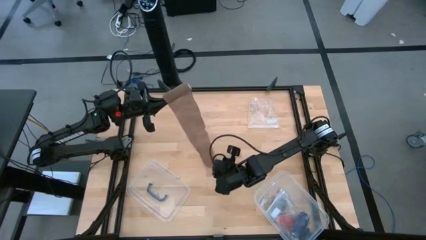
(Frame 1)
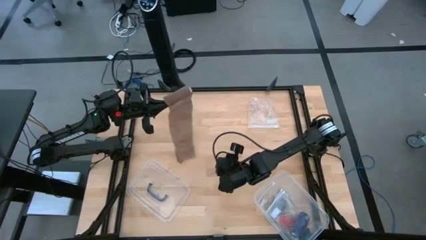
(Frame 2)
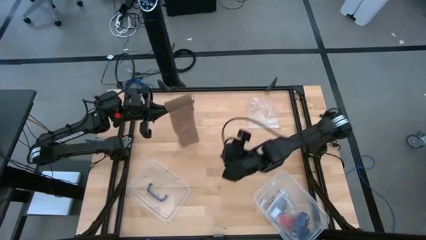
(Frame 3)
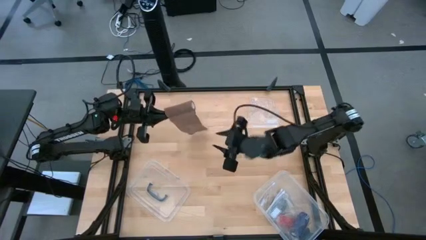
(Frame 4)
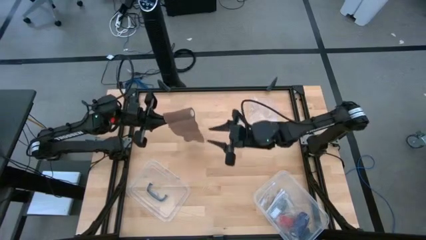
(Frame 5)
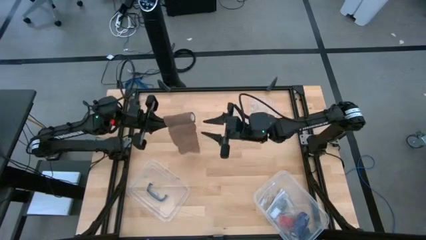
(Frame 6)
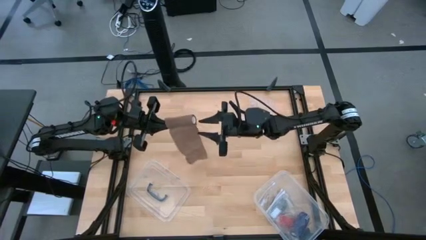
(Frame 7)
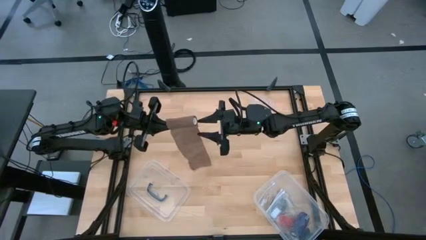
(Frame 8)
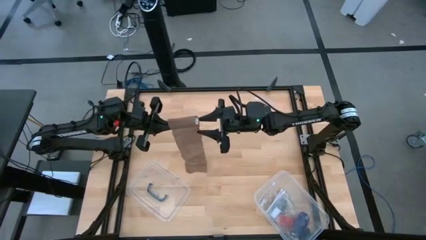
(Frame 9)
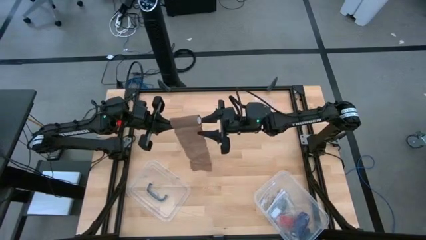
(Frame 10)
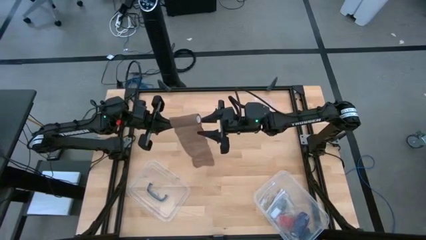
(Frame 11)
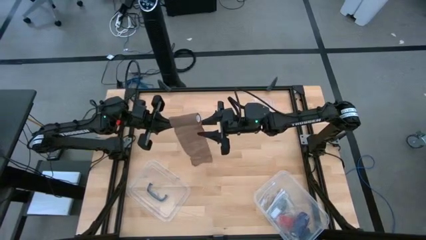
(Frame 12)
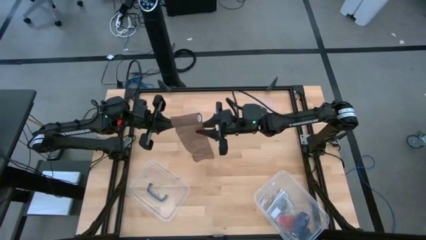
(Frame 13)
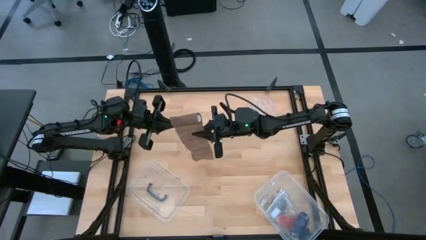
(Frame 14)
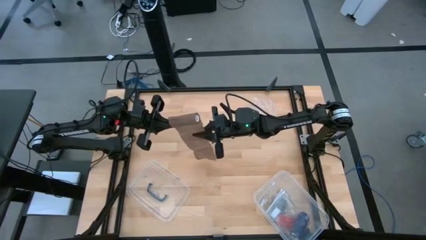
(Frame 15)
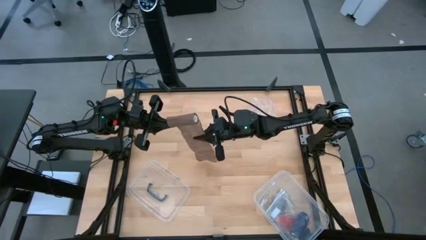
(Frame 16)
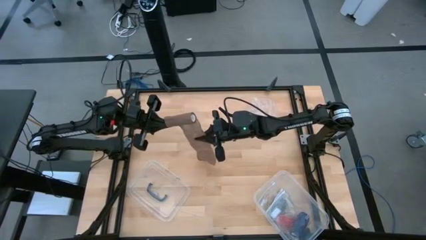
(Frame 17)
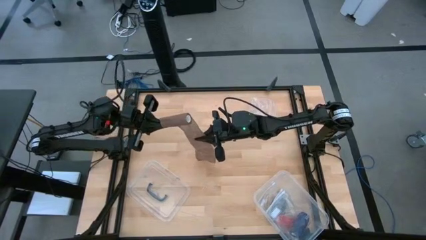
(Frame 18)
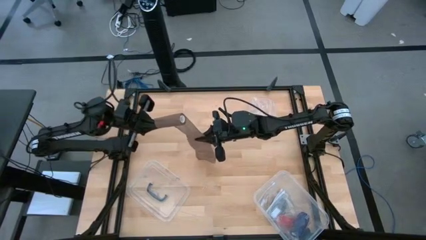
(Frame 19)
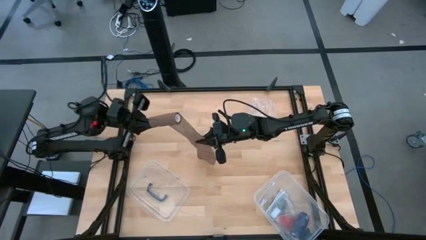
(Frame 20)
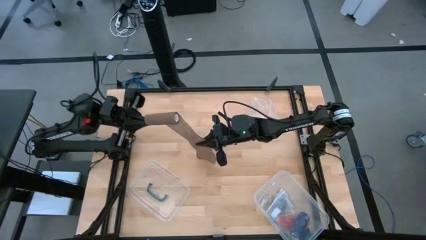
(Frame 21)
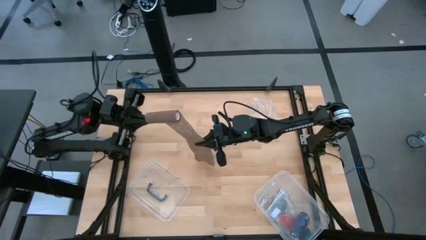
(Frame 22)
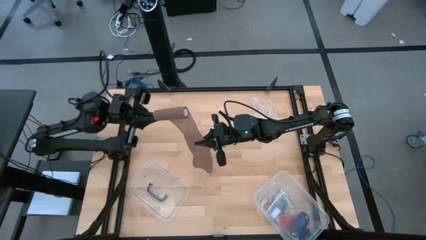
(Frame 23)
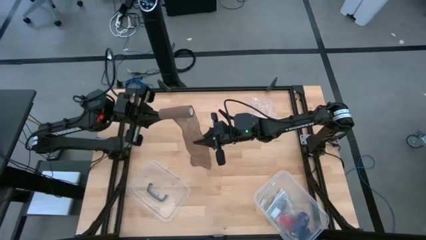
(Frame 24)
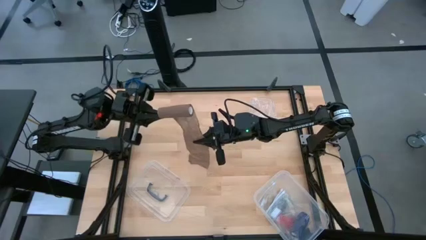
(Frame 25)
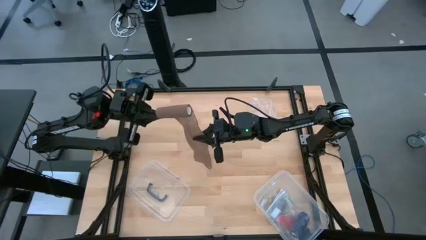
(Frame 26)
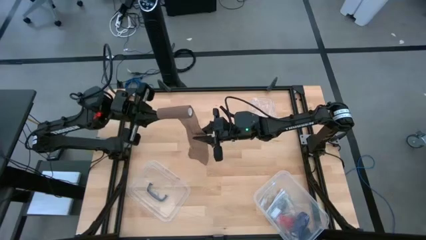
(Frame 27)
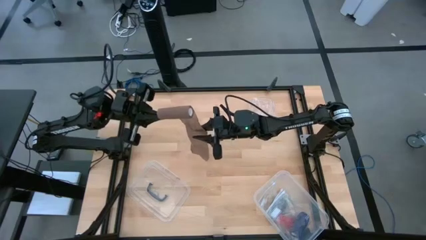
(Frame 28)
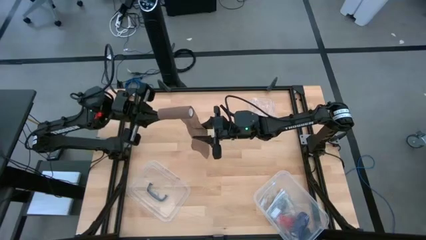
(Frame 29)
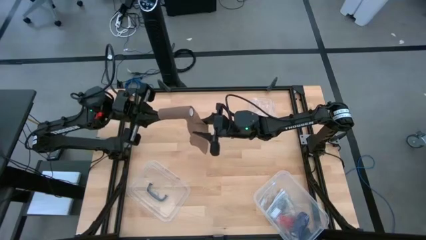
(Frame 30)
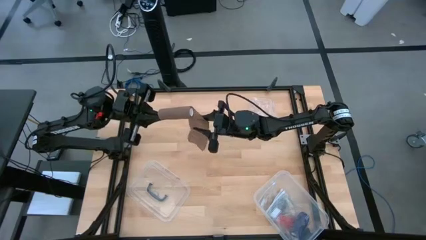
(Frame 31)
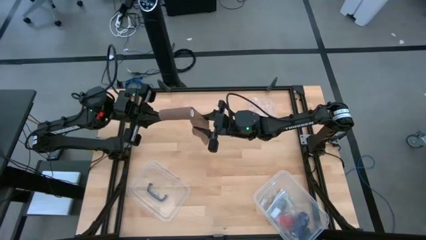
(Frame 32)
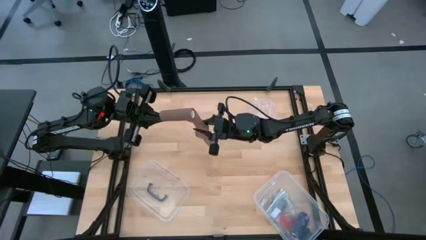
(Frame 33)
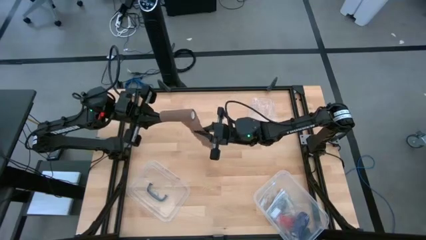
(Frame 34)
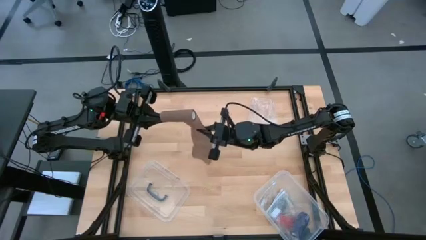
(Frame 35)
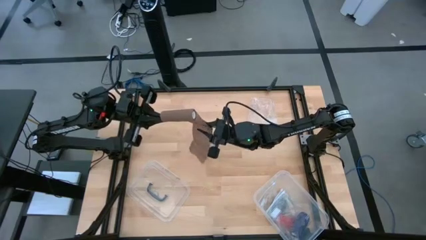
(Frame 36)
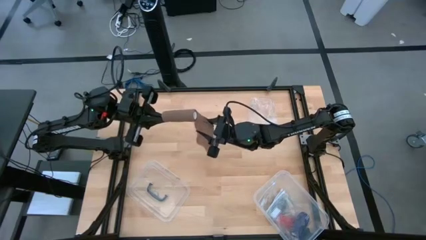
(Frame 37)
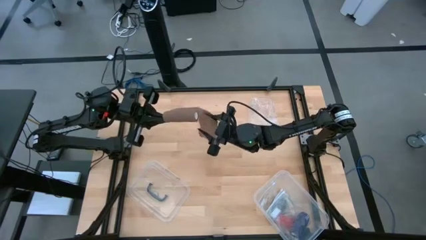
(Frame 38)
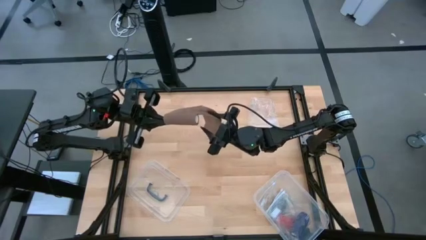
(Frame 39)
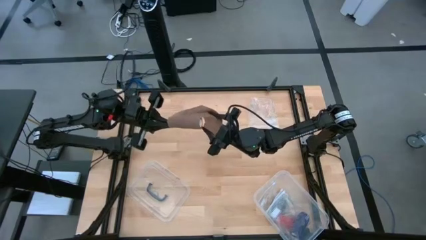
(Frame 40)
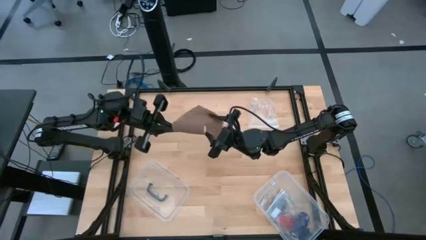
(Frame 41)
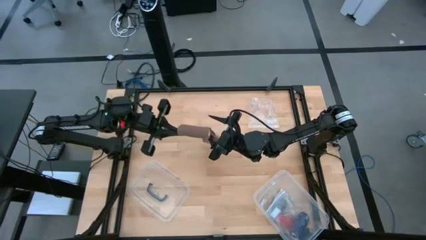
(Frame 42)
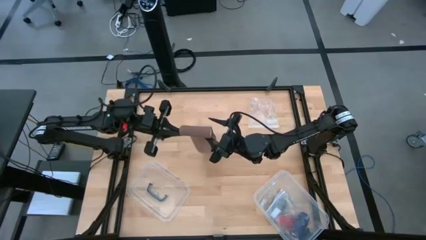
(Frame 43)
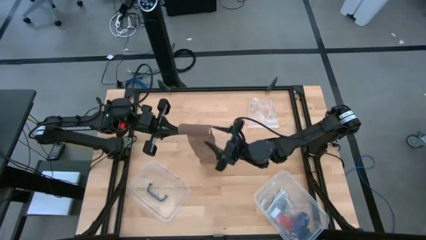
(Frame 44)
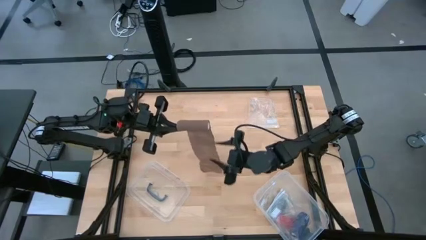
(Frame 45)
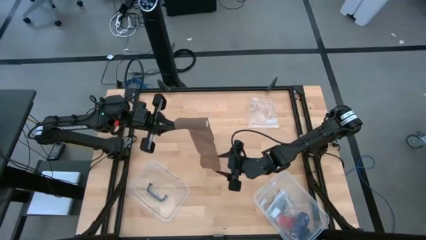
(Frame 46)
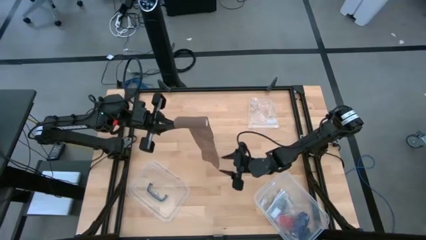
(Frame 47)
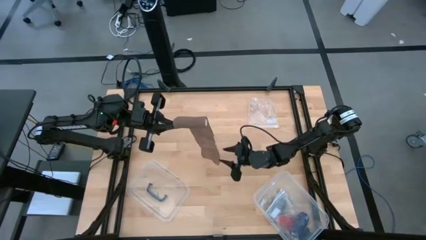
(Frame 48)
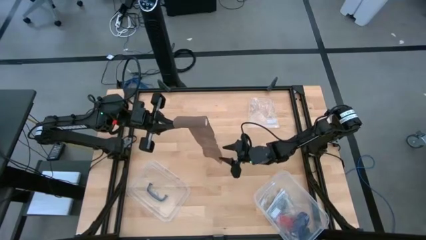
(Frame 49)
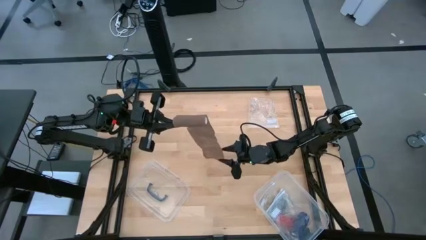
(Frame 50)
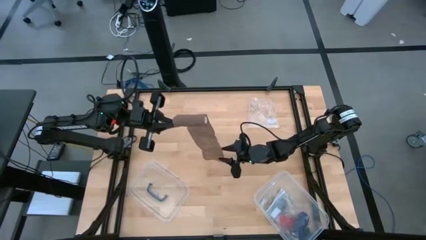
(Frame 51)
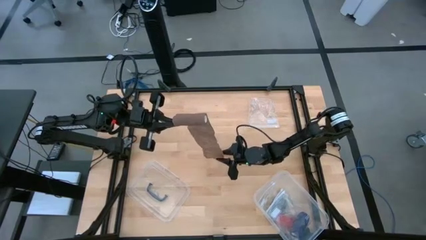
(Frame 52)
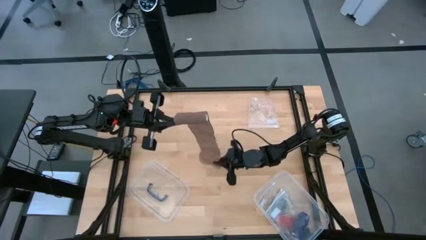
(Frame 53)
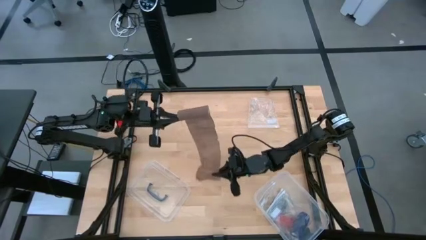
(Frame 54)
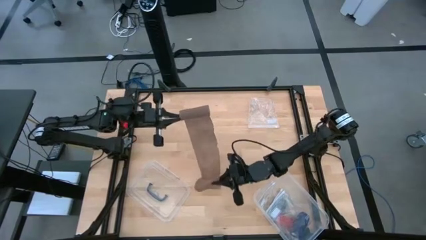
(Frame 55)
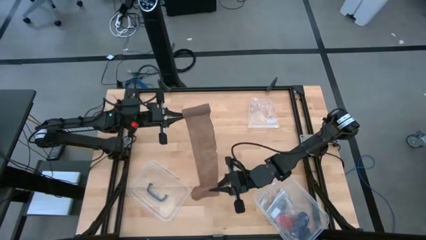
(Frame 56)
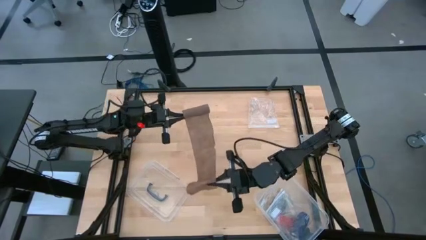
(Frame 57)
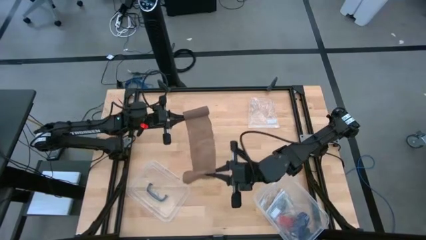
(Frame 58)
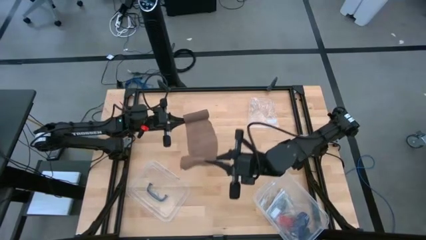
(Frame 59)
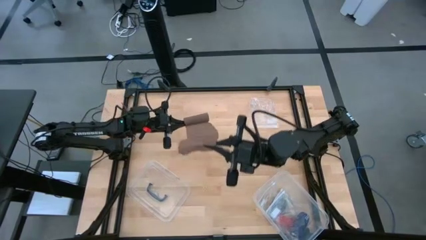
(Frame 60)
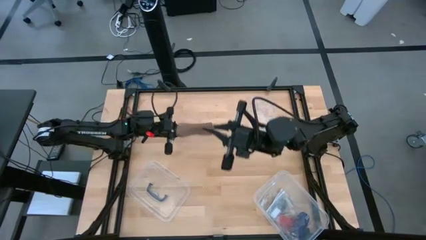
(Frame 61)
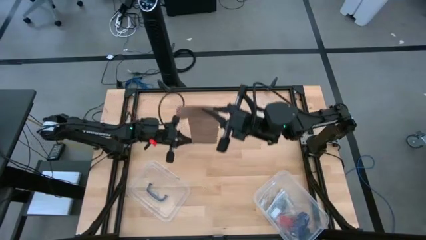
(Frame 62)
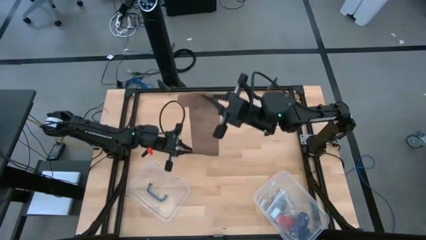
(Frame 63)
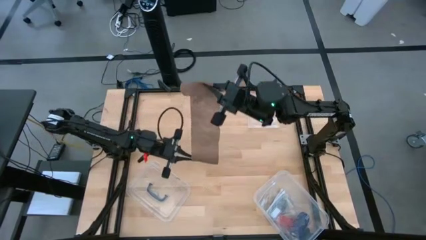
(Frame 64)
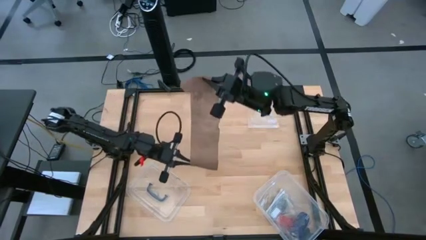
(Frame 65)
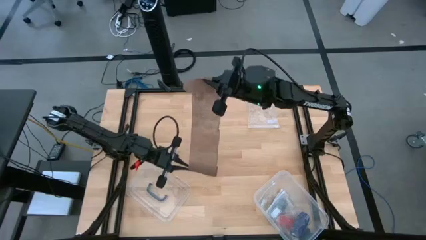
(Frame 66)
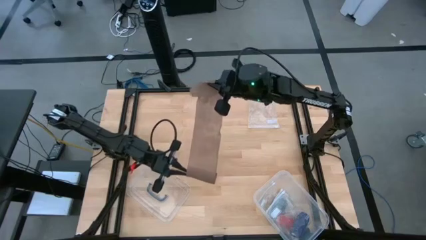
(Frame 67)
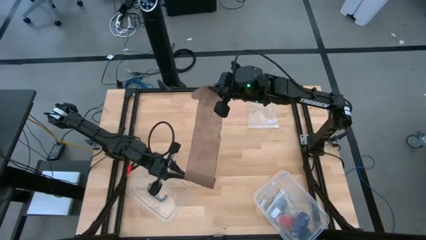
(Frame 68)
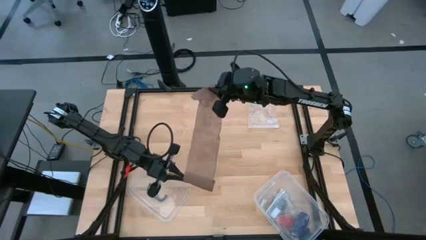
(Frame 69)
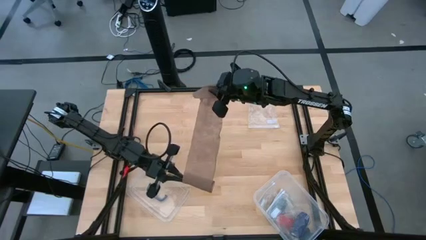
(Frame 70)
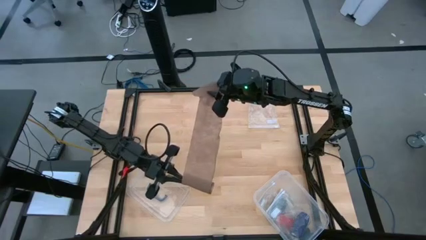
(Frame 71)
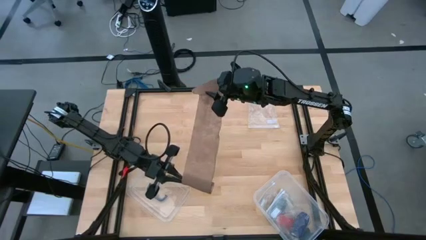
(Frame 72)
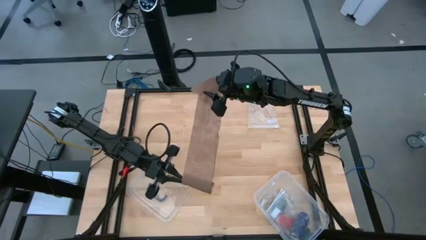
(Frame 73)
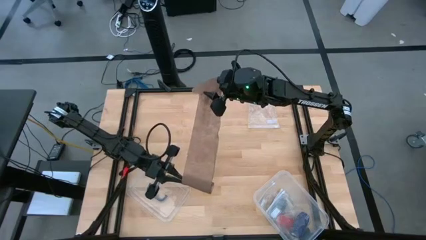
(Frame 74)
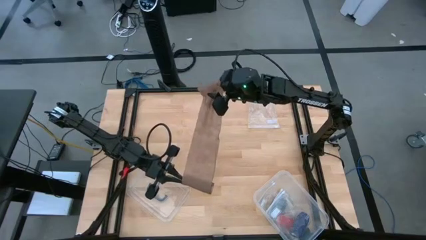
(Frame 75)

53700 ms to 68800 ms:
Task: Roll bandage
Roll the brown bandage

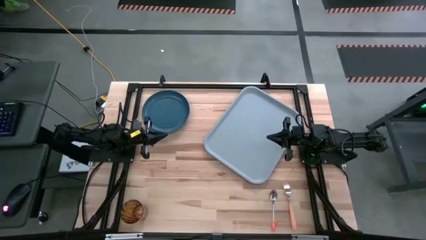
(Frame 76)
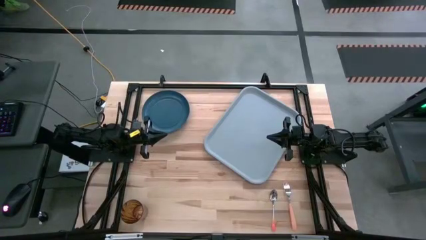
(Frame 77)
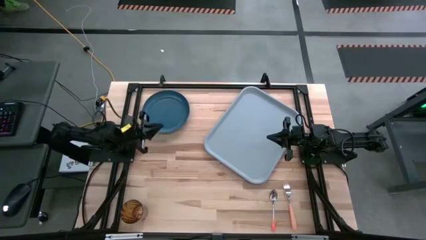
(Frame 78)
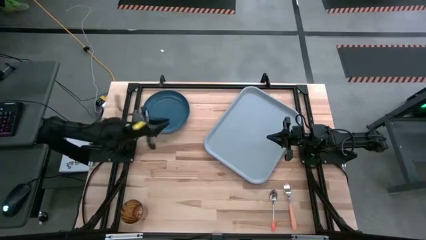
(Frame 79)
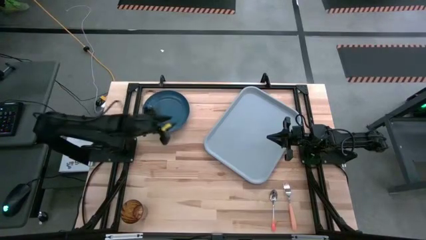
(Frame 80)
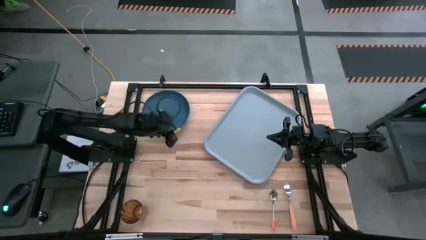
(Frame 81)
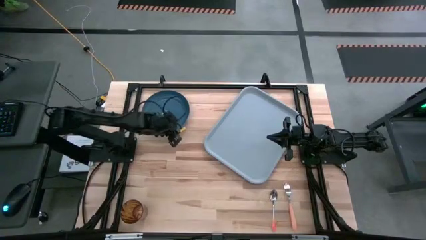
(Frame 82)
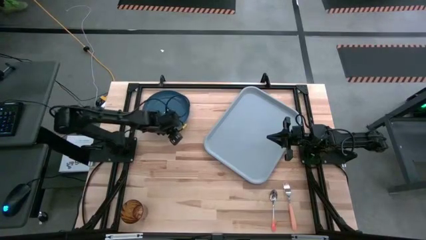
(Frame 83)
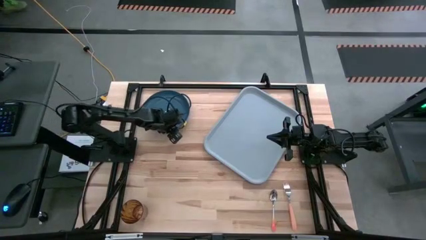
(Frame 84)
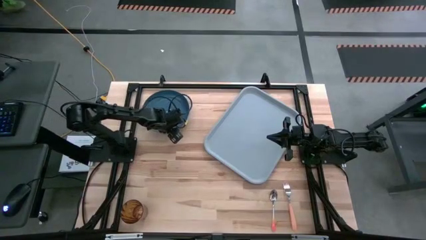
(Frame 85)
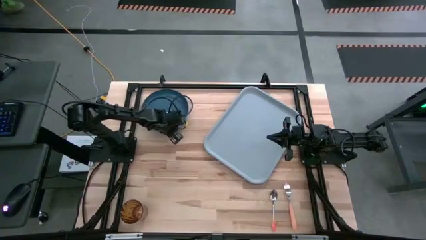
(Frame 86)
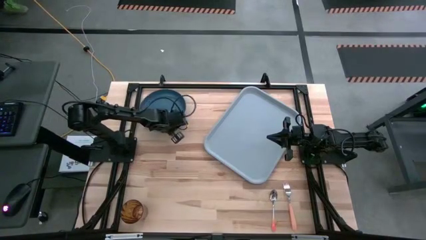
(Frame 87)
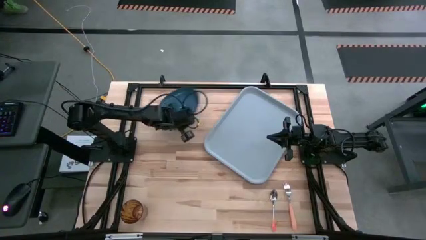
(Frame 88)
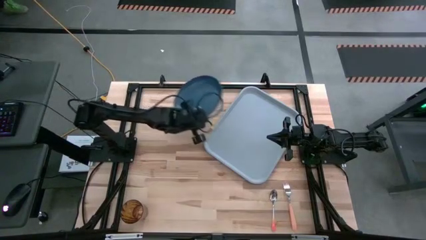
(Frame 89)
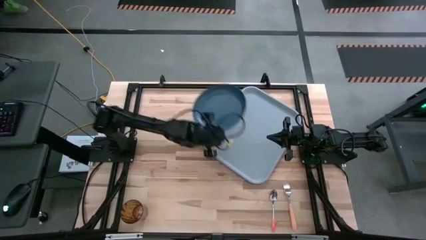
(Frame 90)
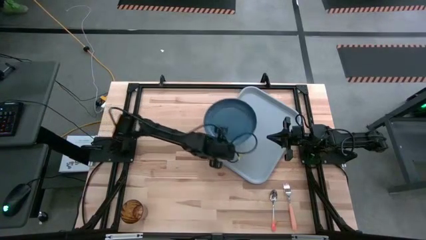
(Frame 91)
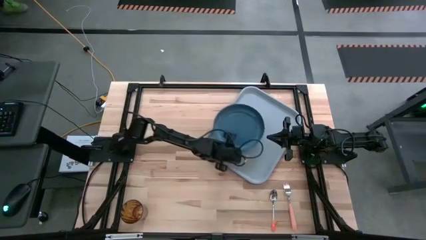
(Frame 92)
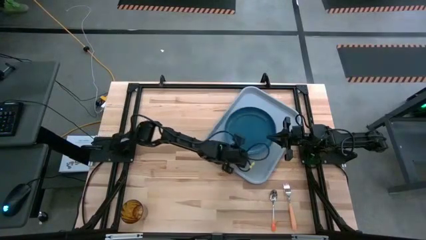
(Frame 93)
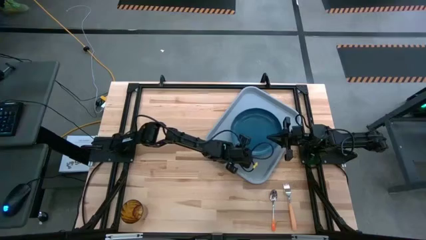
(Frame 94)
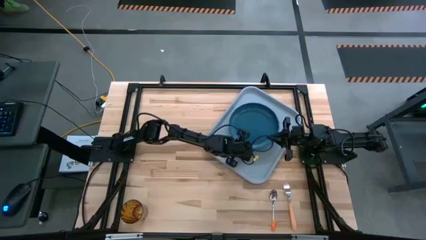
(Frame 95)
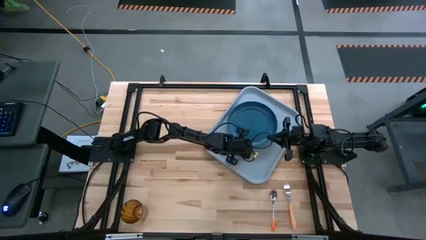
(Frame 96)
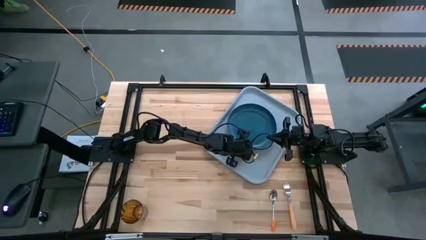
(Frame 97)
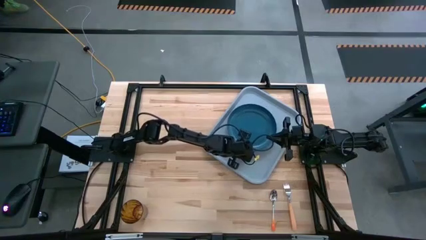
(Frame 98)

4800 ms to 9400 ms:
Task: Pick and place plate/cup/fork/spoon on tray
Put the blue plate on the blue tray
